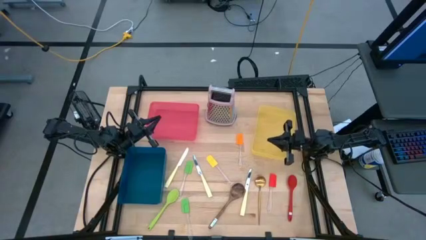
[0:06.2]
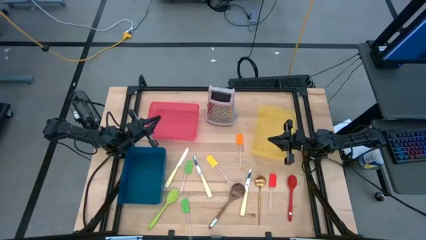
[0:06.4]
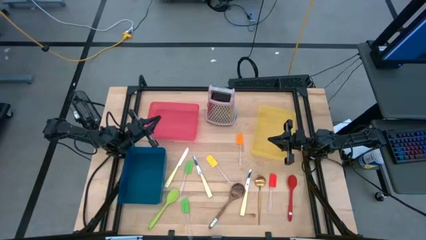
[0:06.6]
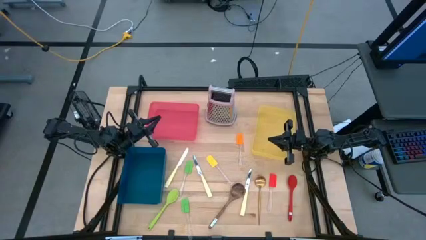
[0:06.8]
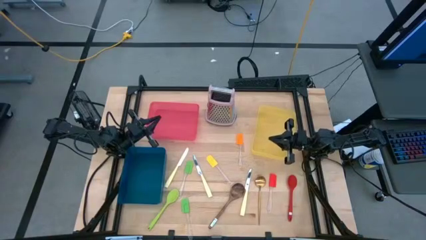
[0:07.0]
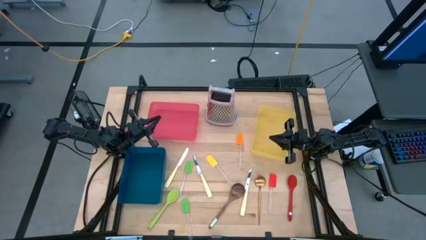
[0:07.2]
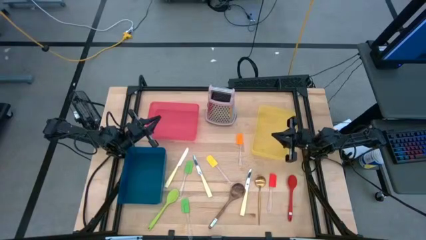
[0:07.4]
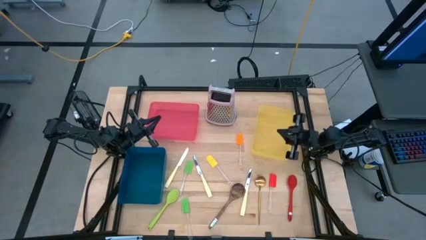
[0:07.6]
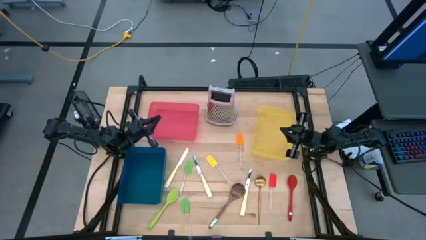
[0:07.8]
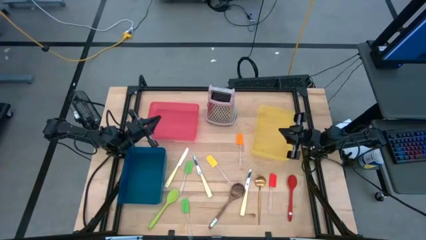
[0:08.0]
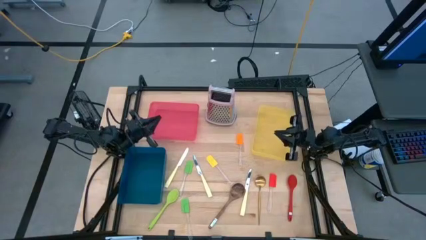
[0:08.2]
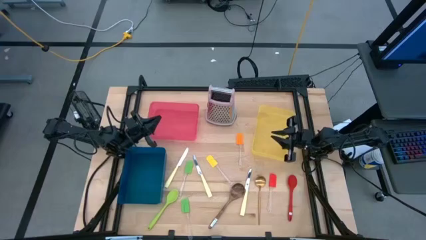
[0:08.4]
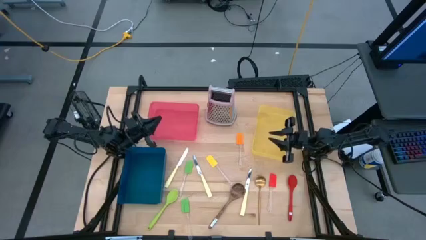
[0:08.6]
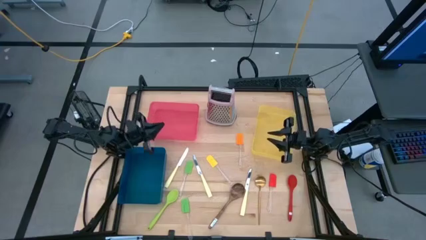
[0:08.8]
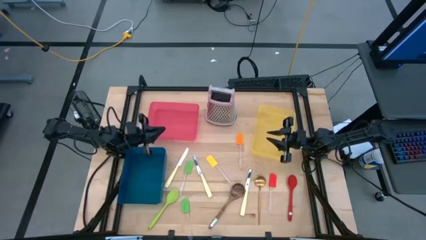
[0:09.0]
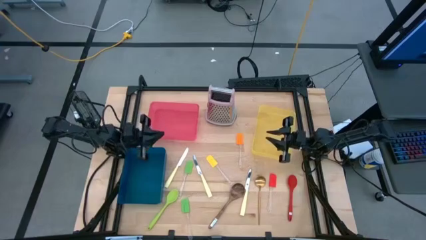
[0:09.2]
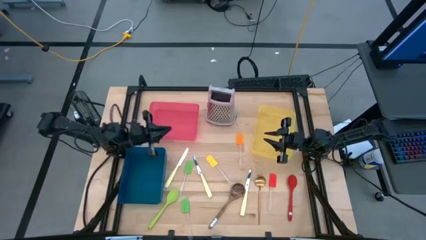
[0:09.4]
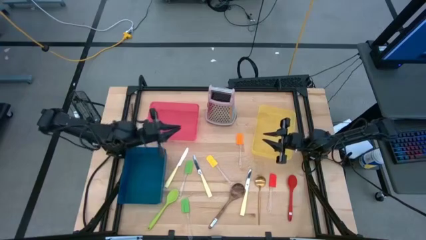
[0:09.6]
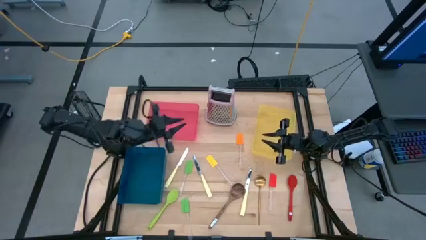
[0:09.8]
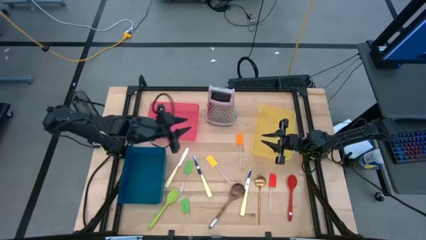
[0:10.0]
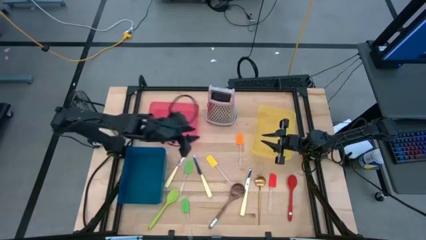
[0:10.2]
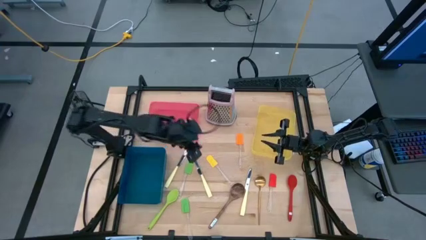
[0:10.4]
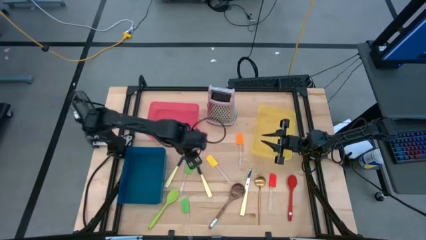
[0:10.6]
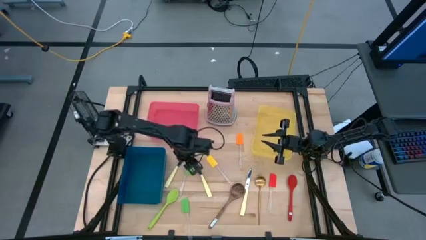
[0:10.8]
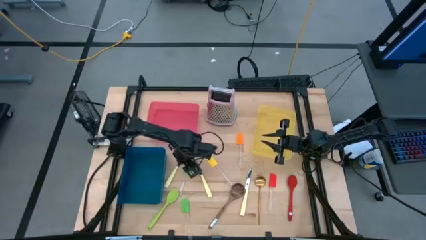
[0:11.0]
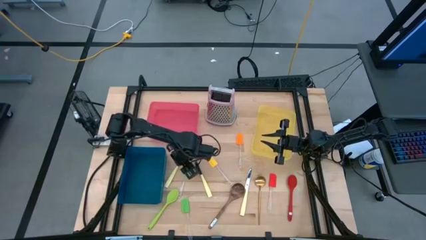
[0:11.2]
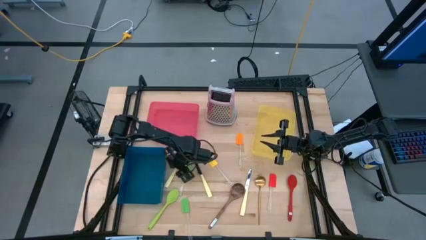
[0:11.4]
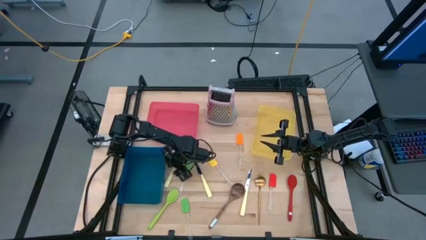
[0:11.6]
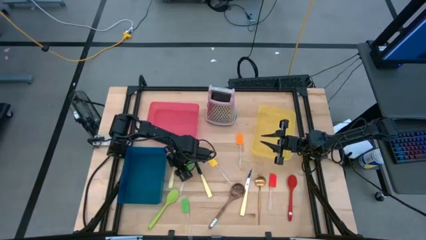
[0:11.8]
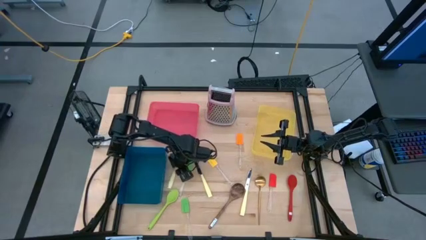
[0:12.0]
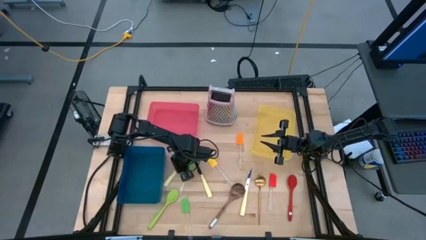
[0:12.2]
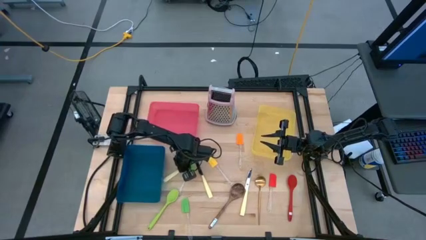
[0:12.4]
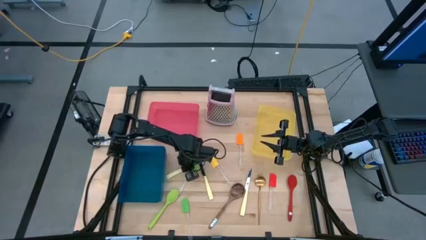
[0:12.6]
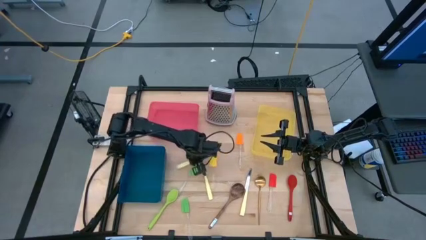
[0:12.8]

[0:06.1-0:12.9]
Task: Pick & Place Kitchen Items
Put the yellow knife into the red bin

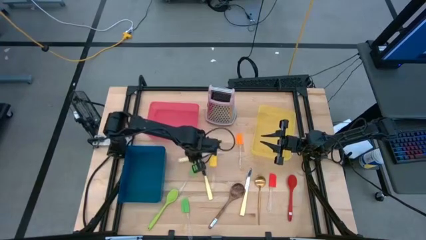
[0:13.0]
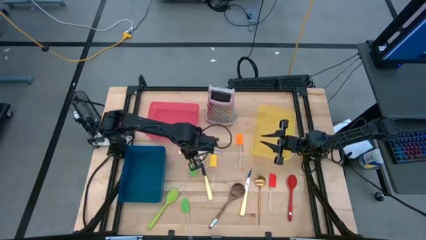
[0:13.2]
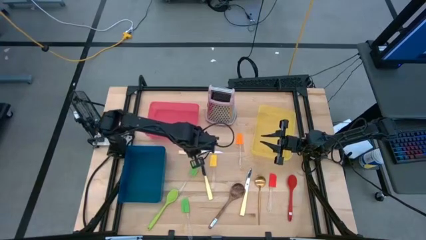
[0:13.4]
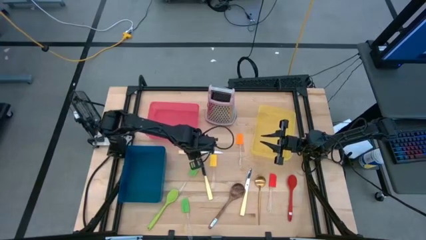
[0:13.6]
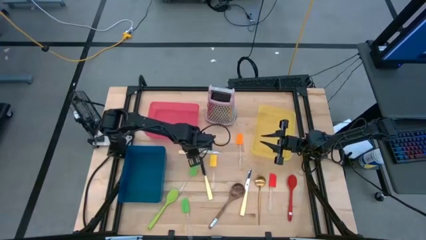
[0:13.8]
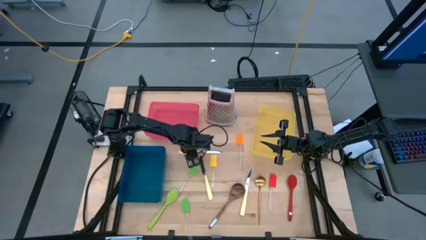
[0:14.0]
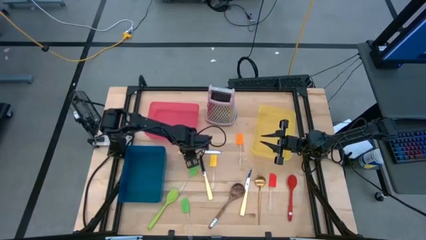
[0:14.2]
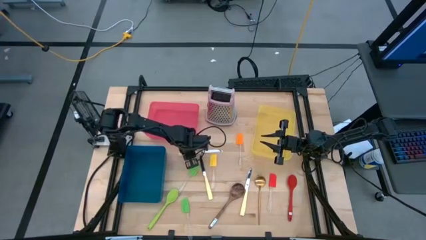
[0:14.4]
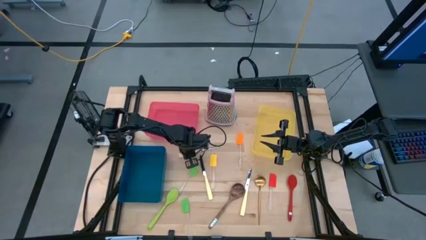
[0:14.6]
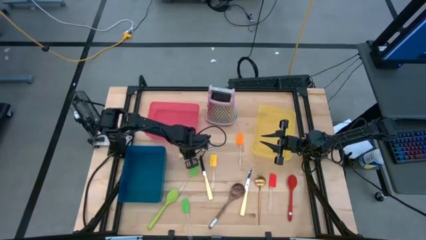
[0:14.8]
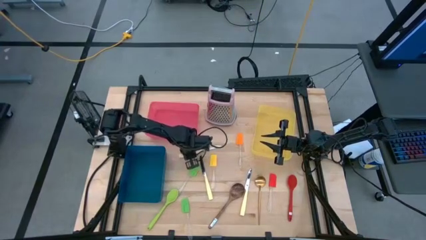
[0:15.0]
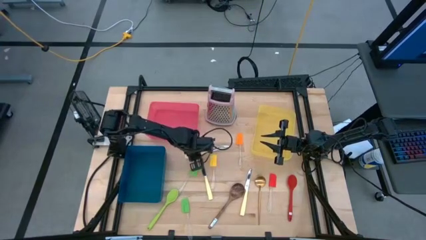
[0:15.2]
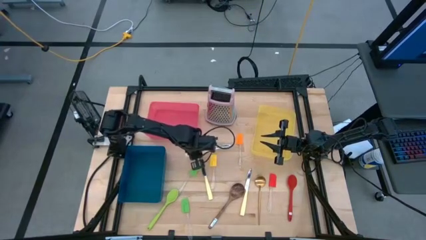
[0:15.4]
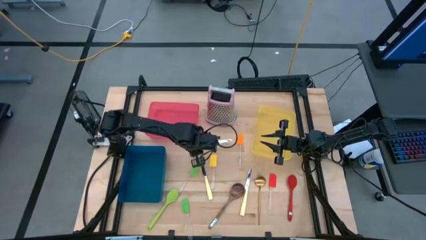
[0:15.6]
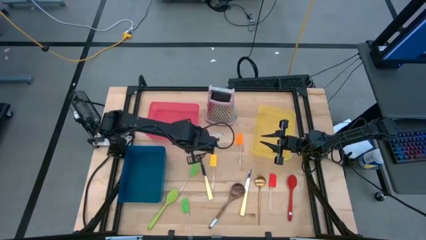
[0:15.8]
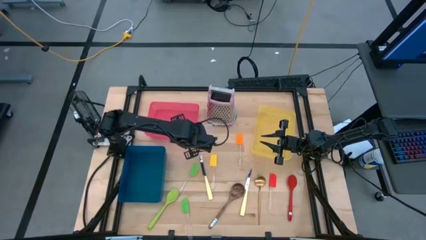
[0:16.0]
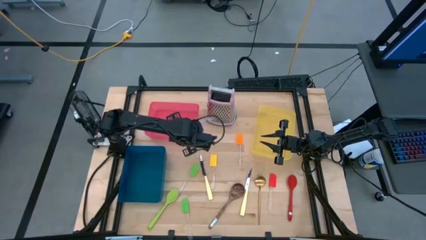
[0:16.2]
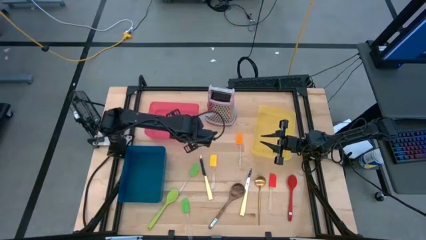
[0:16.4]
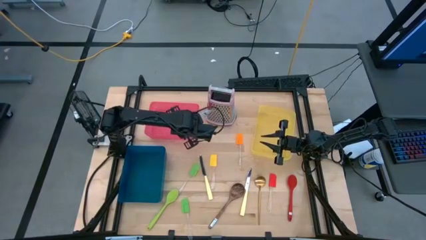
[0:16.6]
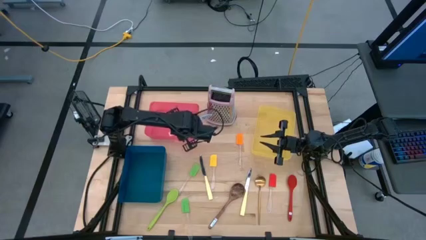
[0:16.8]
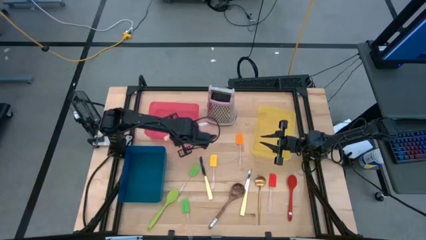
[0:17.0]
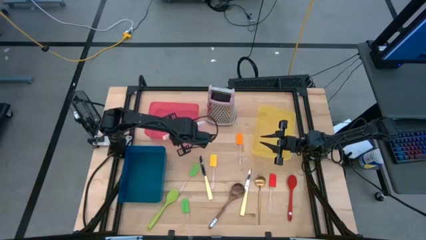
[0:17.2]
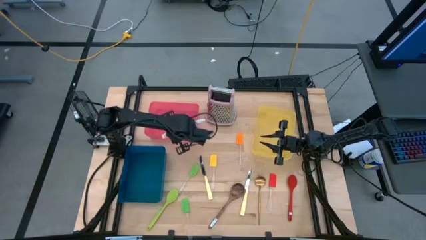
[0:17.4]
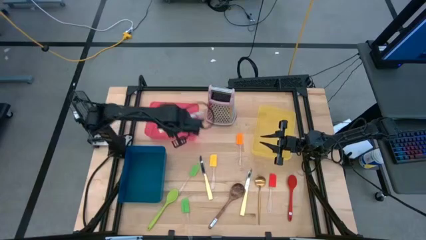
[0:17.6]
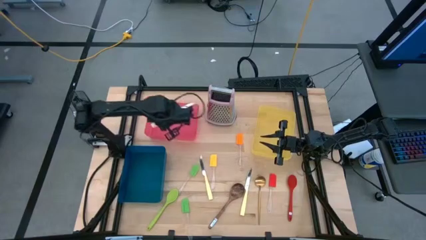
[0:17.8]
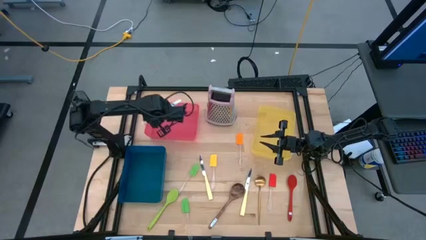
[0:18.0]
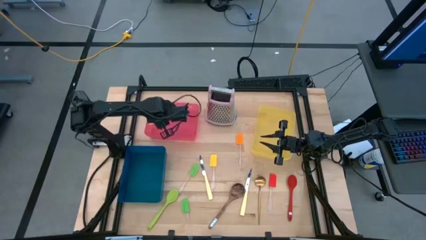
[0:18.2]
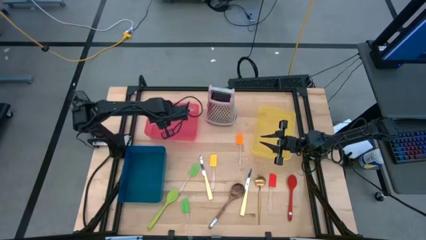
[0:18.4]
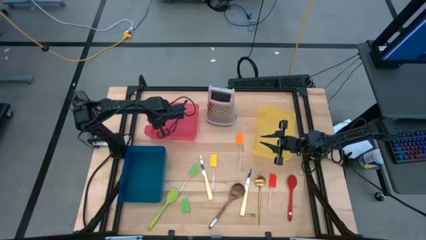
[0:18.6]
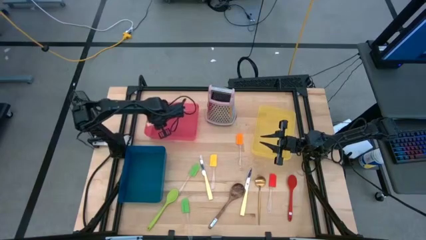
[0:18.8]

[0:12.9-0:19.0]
Put the yellow knife into the red bin

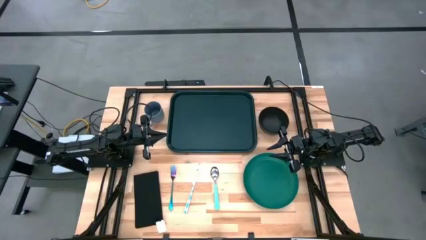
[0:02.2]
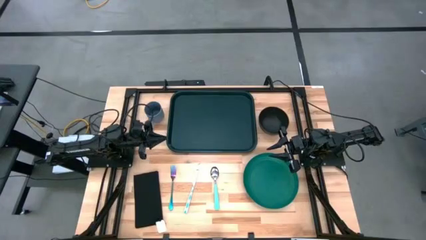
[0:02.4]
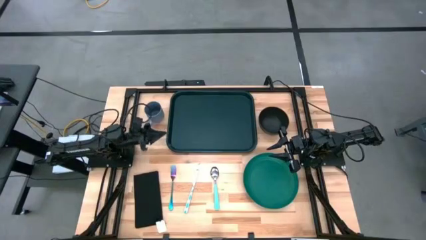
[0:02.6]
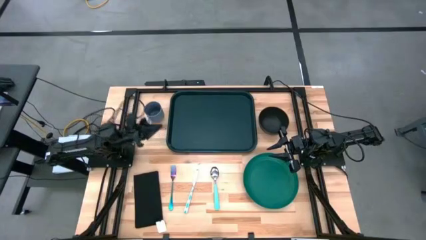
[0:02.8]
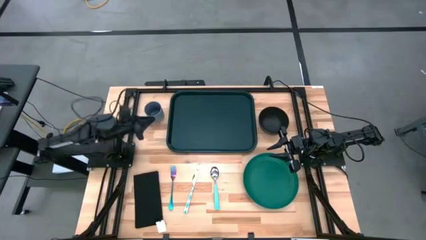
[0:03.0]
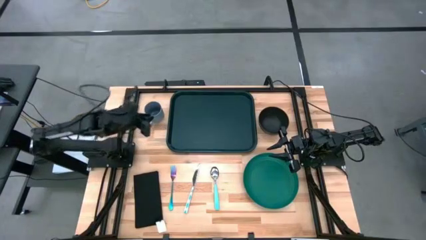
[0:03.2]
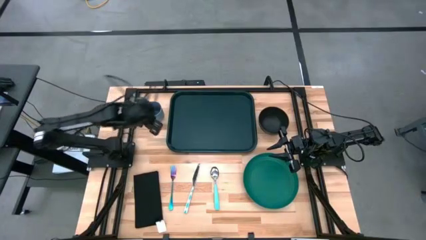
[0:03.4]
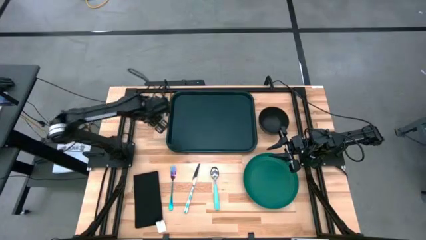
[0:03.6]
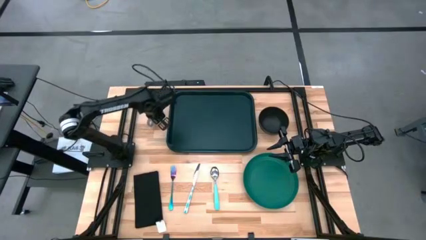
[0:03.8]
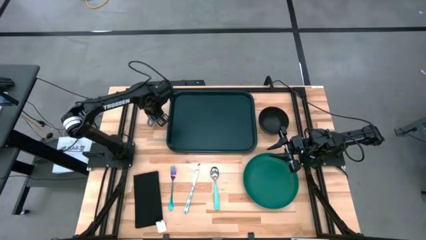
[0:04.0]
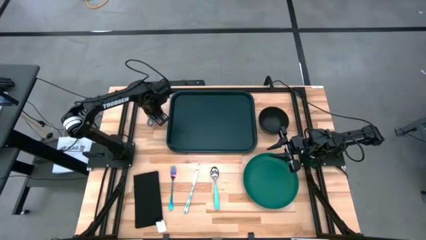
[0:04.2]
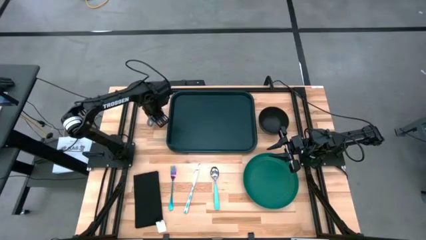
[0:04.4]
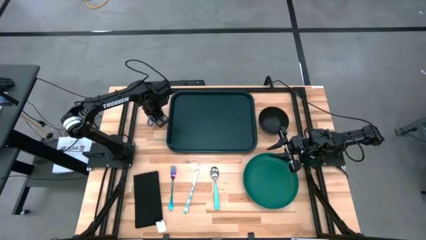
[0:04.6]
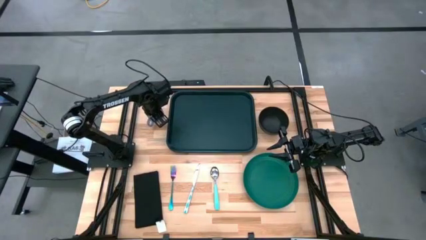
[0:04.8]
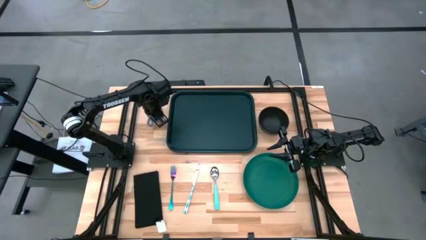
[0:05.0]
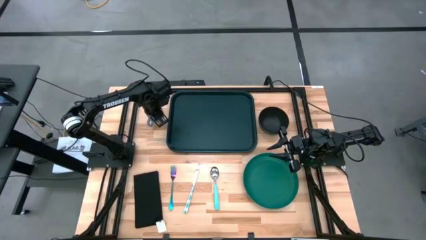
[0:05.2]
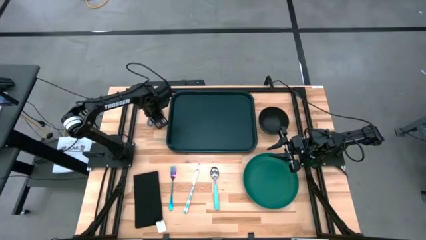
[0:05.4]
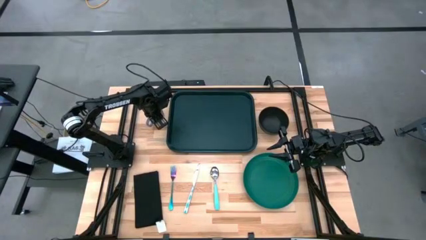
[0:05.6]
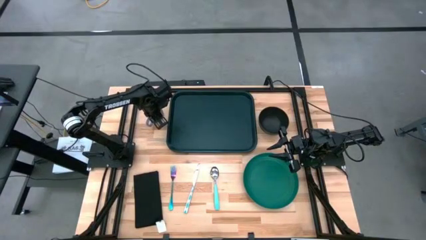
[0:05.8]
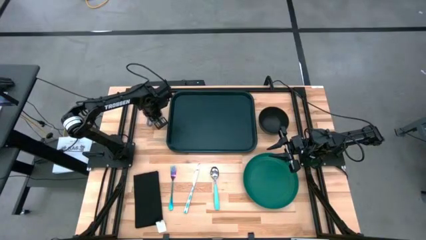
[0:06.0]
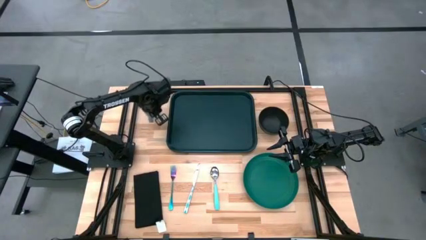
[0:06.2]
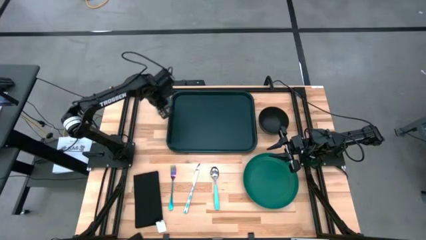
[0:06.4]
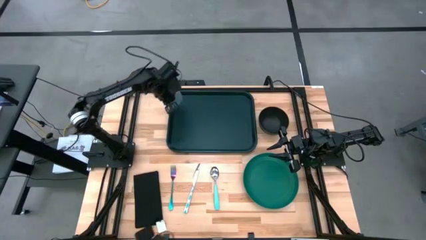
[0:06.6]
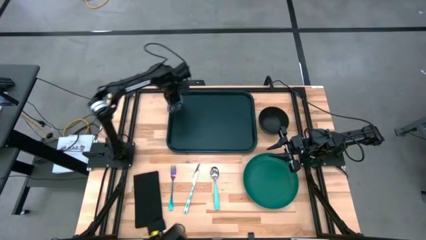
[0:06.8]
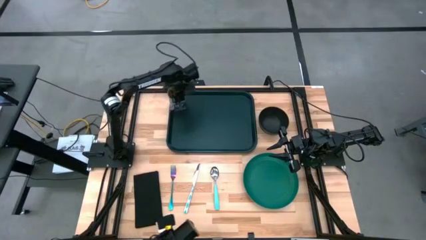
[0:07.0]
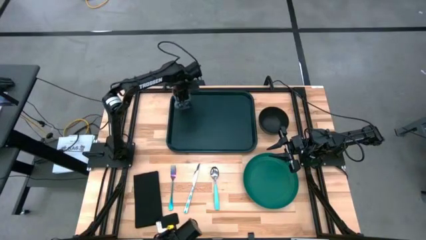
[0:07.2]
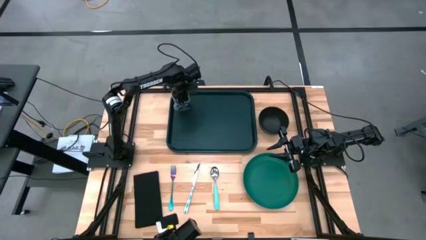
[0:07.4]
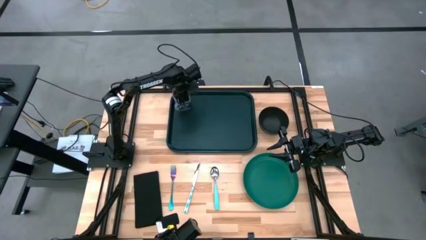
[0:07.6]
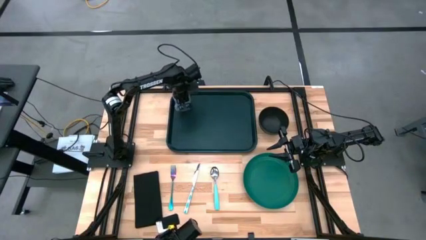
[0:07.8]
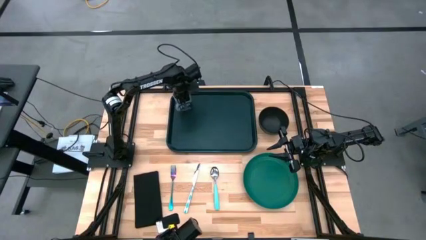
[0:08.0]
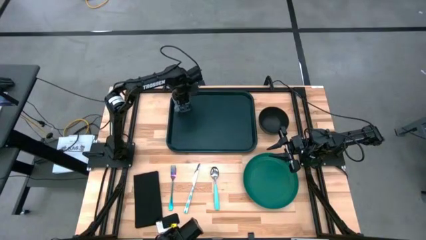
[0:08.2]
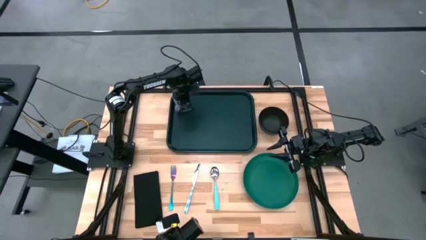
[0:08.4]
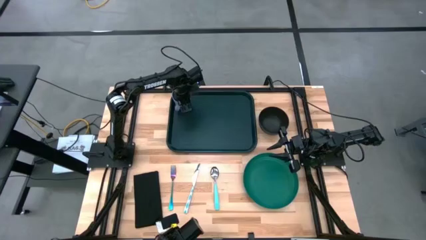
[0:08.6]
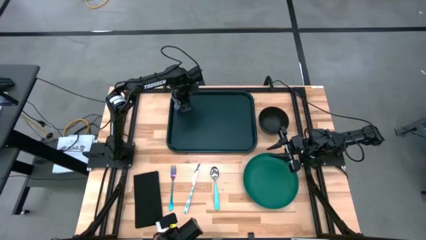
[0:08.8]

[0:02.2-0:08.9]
Task: Set up tray
Put the gray mug on the black tray
